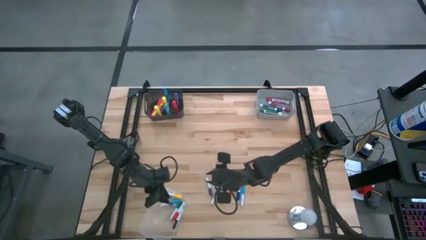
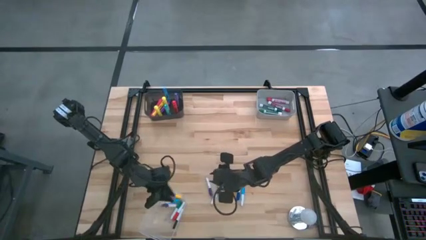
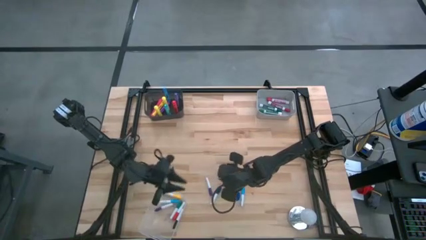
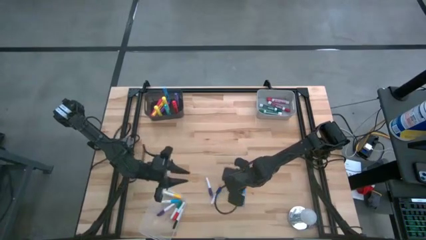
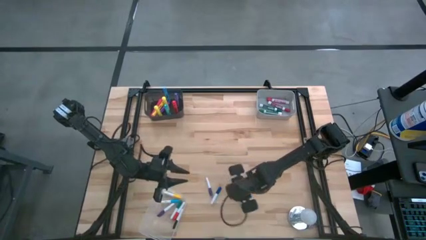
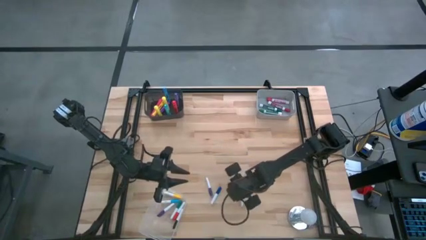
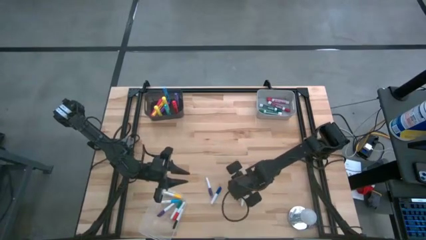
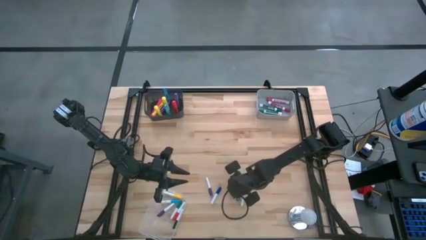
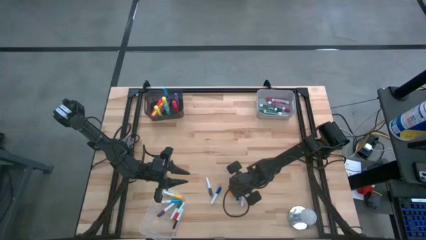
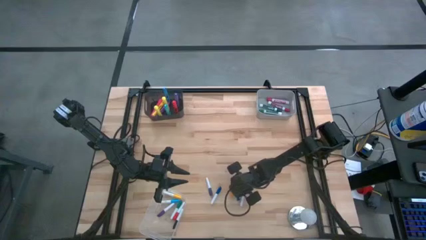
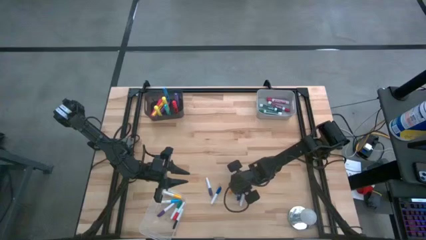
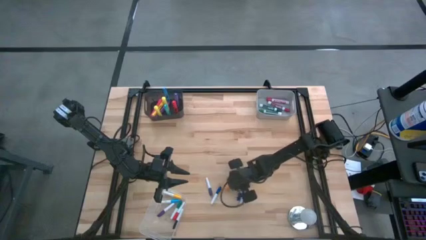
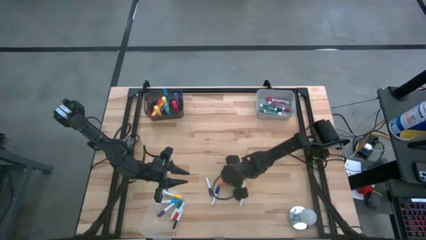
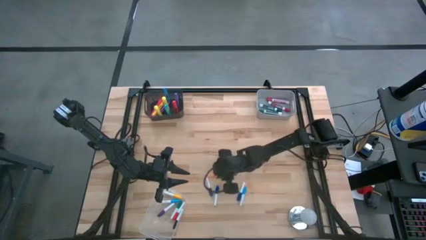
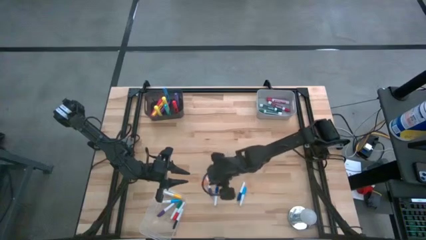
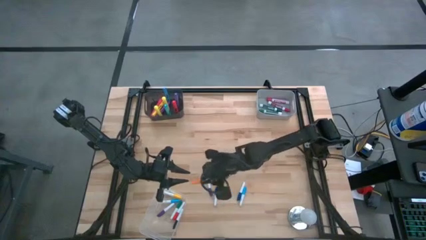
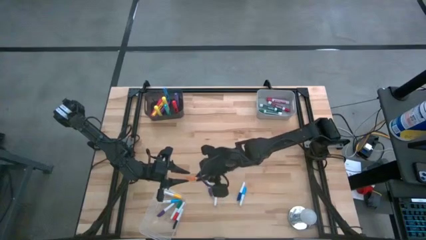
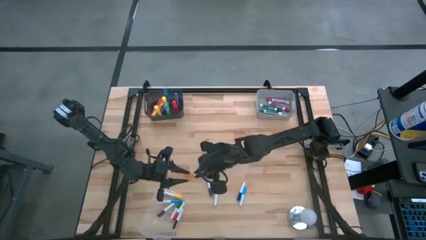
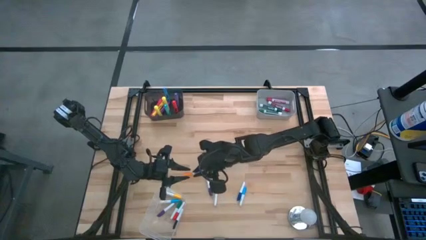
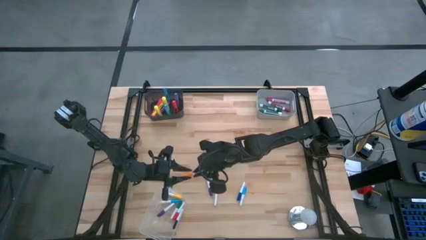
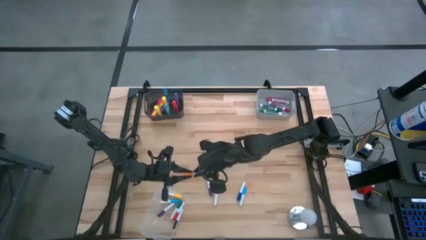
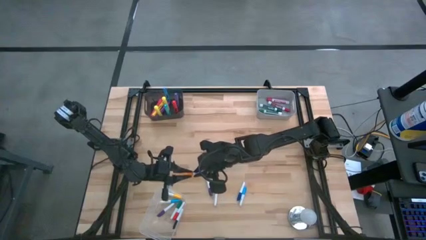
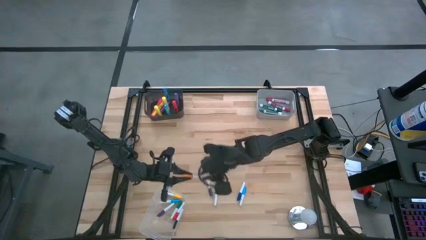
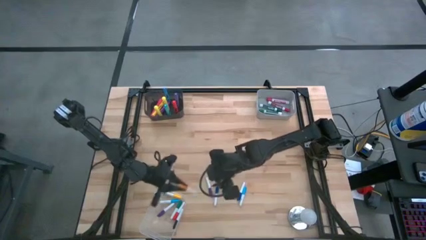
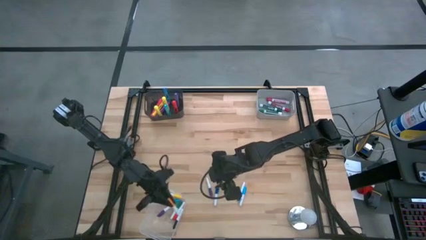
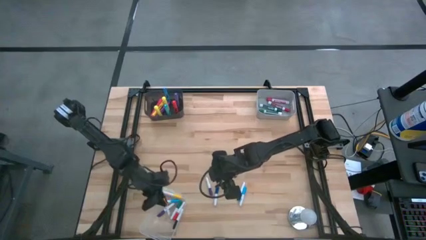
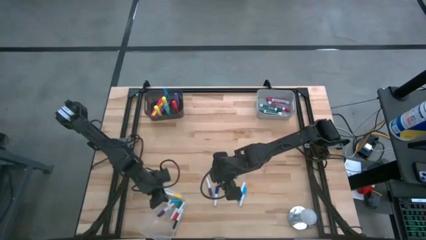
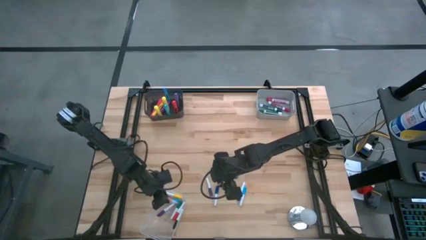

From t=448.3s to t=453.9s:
Task: Pick & Place Markers
Put the orange and white highlighter pen into the transparent bin

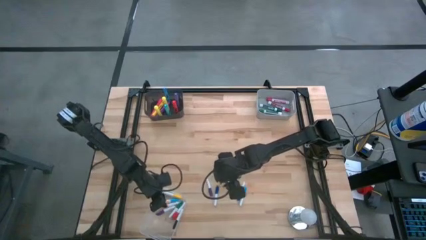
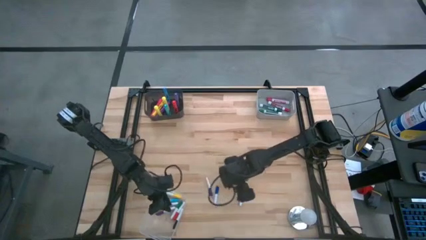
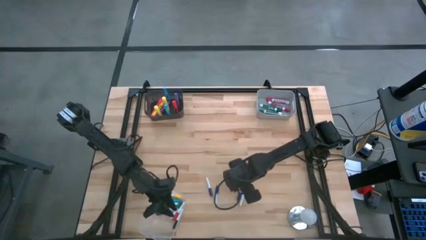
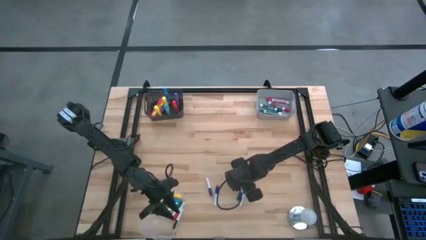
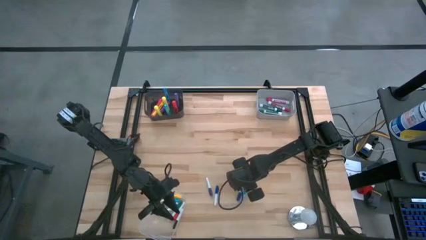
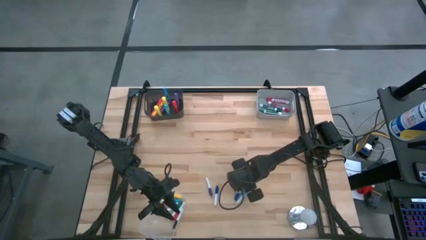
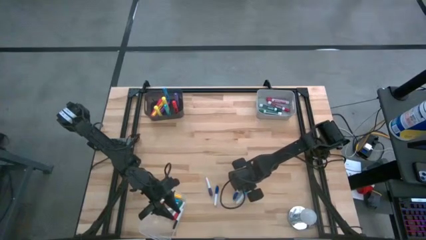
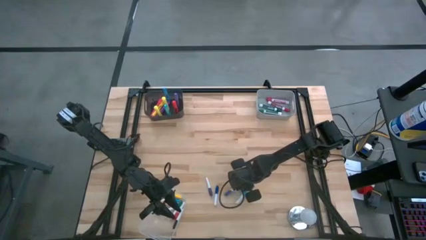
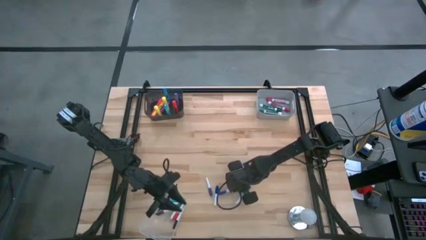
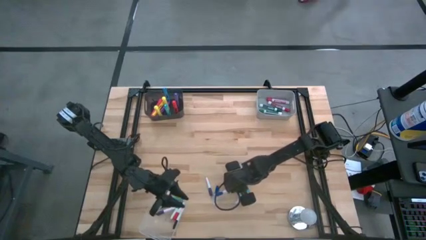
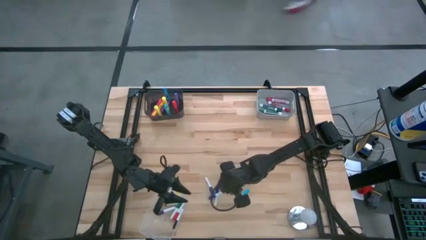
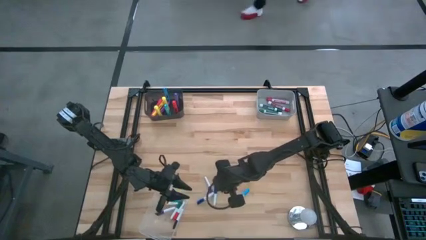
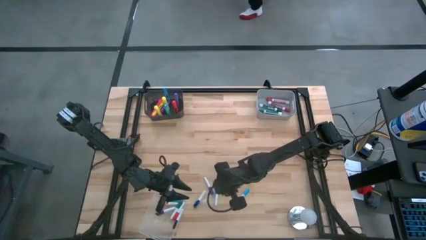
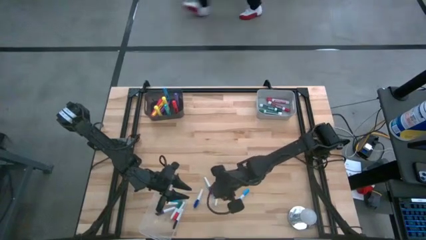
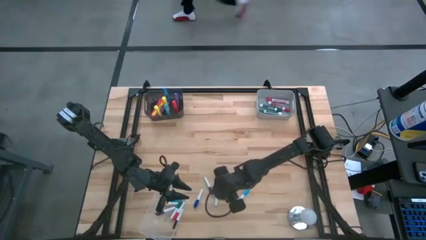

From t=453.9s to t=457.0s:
Put the blue and white highlighter pen into the transparent bin

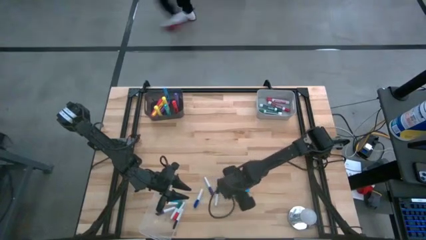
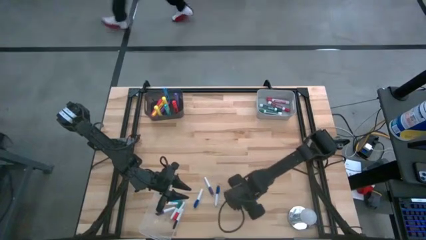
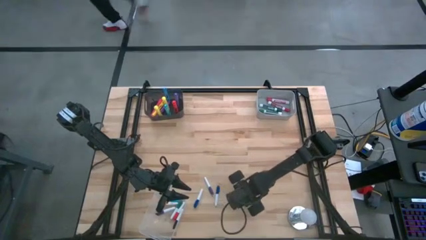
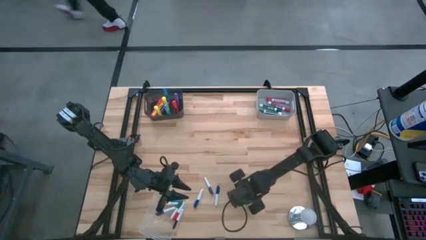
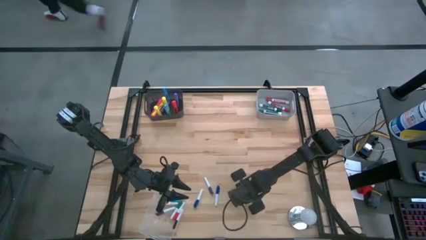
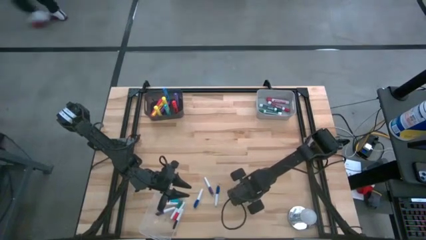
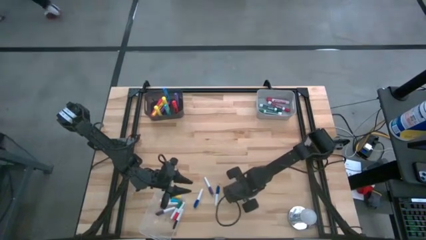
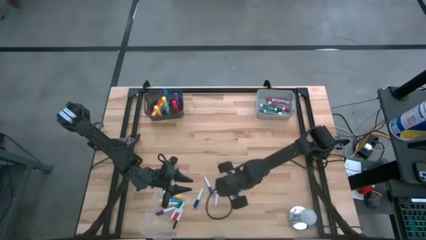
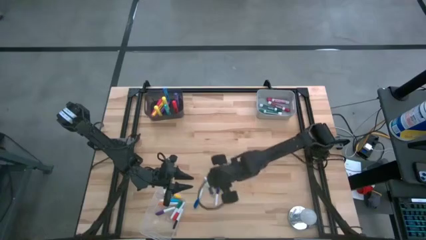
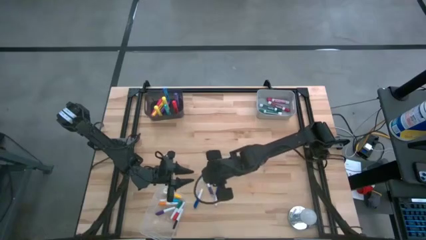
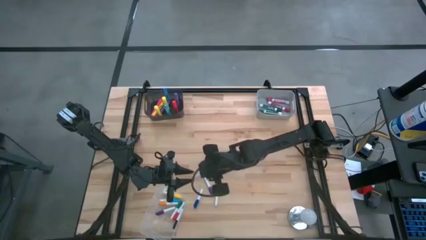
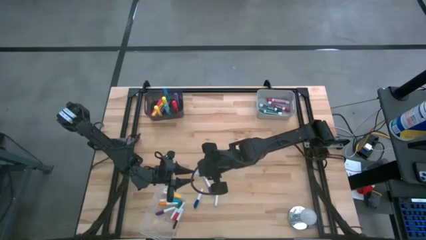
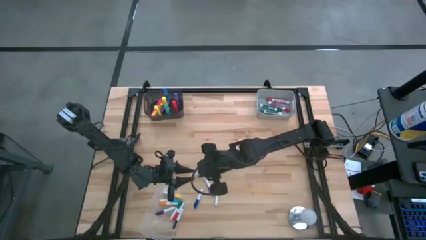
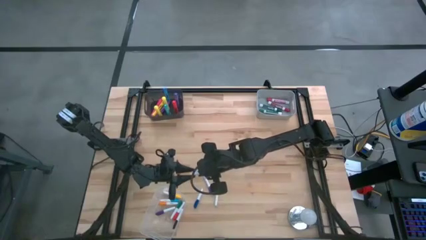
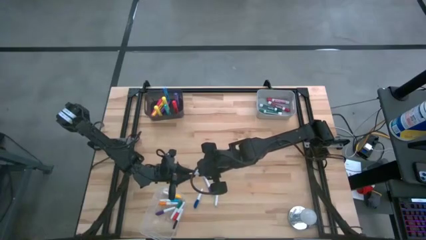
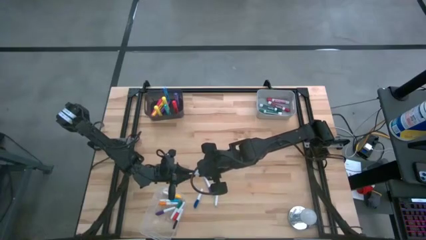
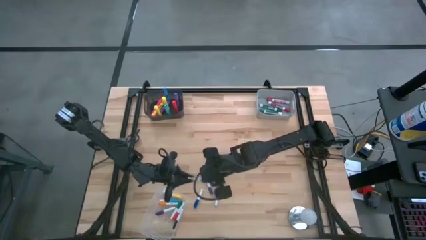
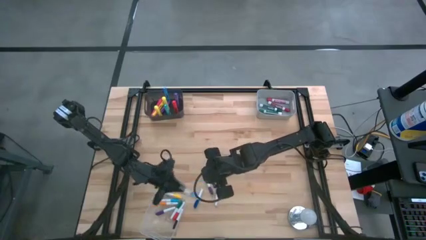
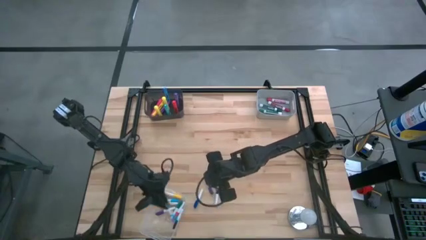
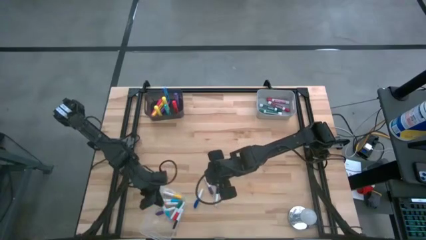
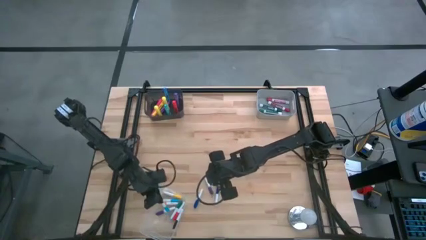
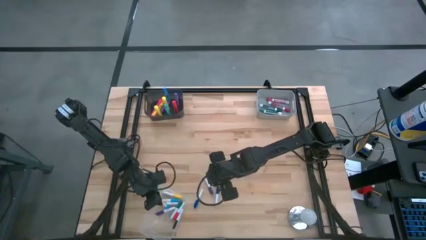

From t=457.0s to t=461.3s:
Put the light blue and white highlighter pen into the transparent bin

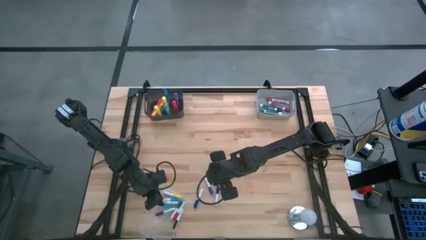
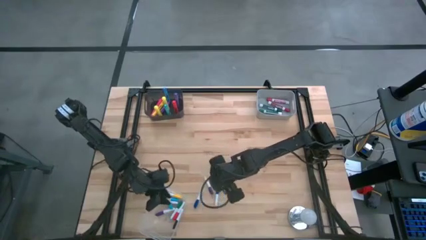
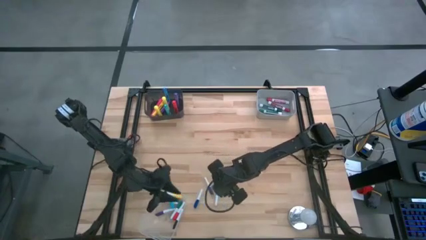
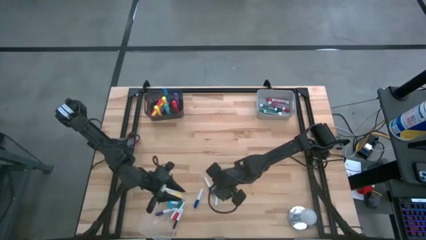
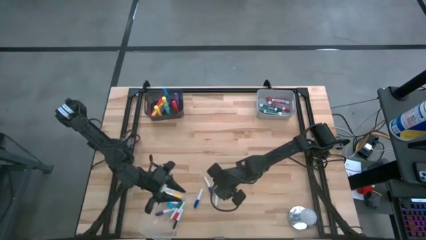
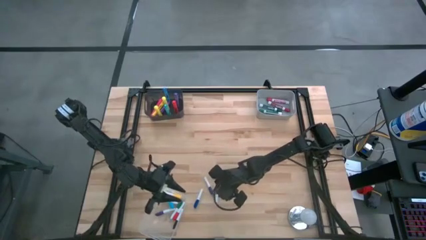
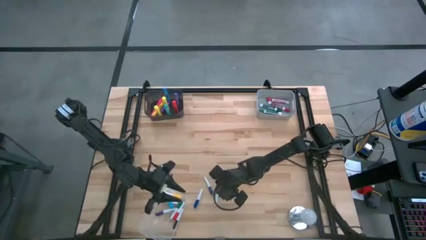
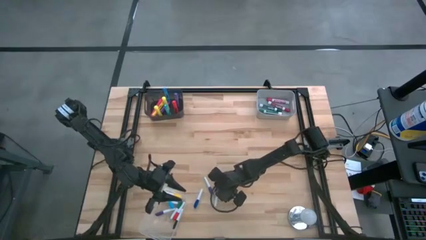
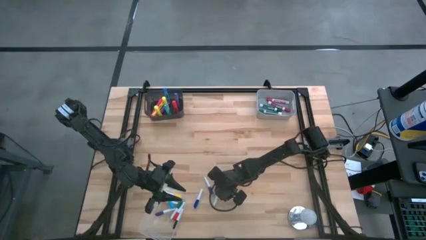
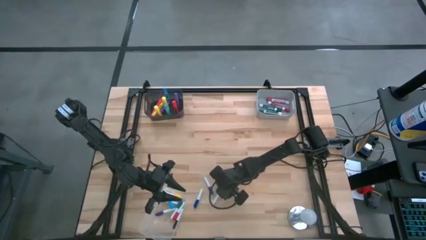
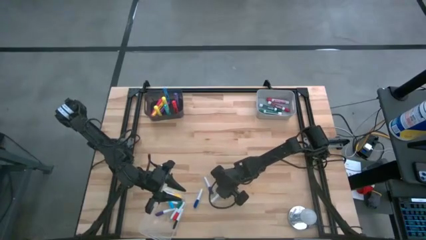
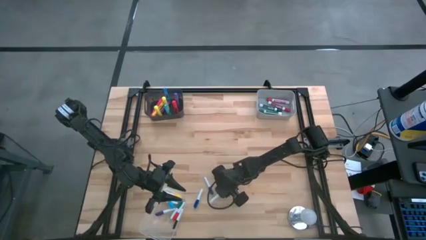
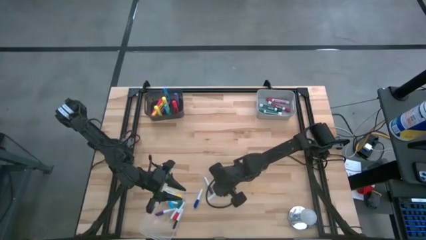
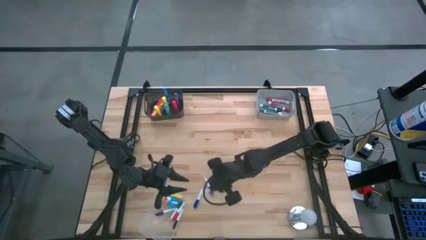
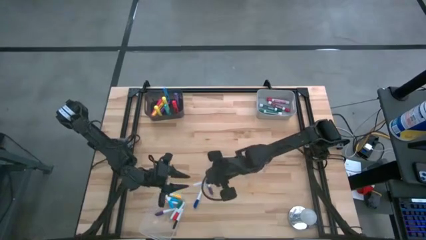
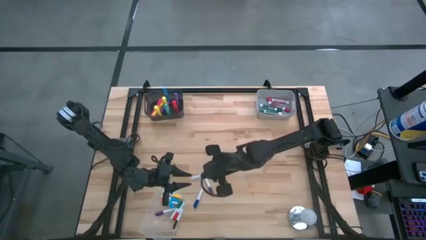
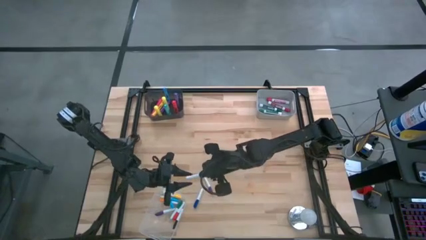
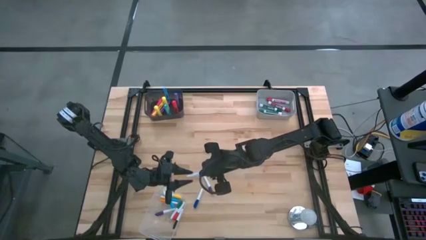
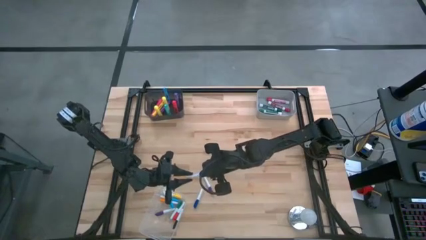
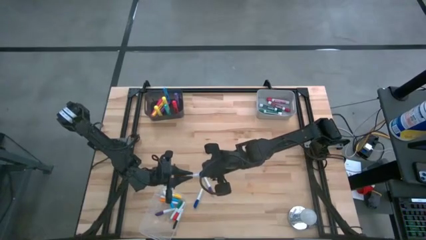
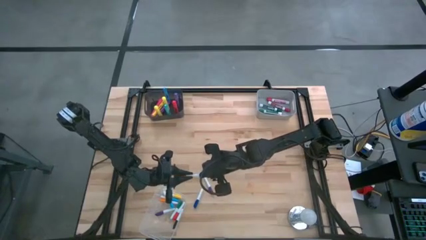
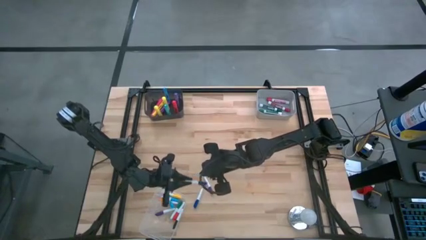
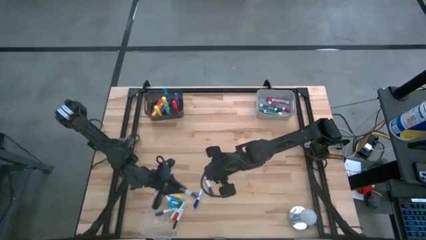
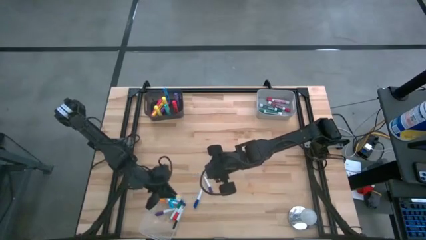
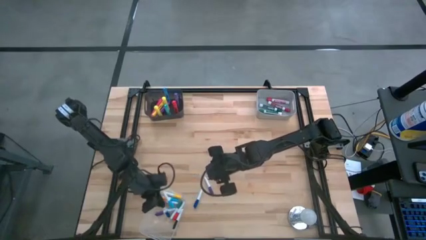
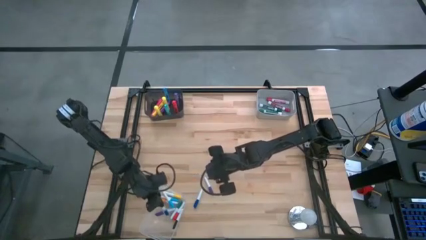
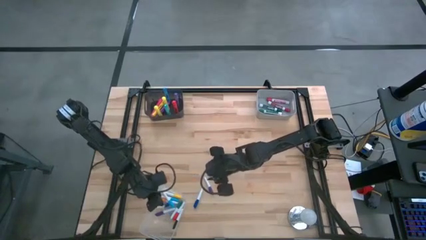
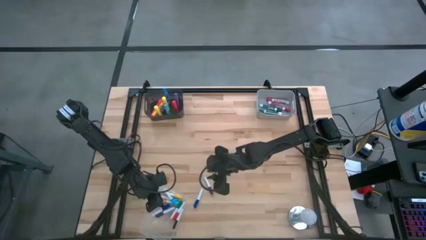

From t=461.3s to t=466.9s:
Put the blue and white highlighter pen into the transparent bin
